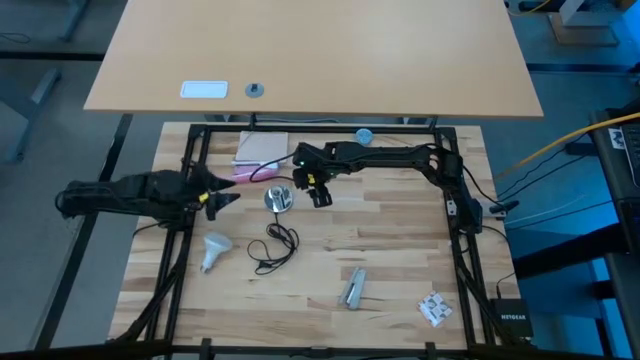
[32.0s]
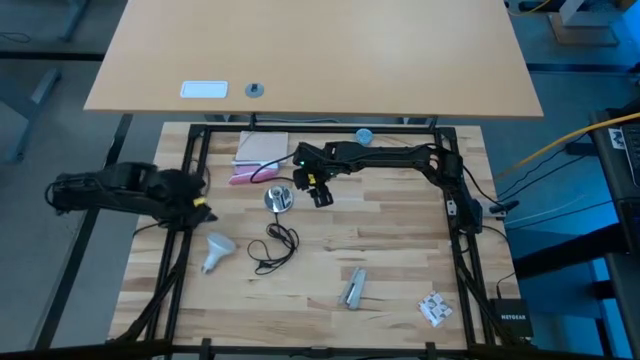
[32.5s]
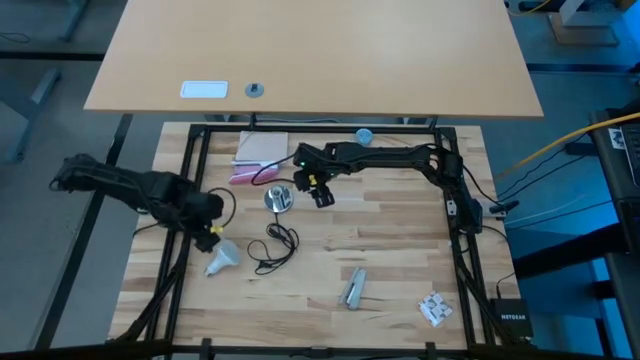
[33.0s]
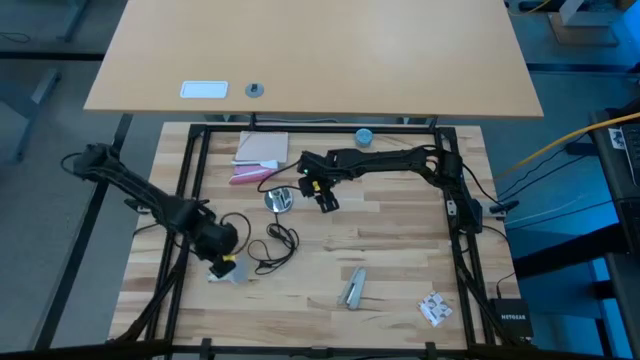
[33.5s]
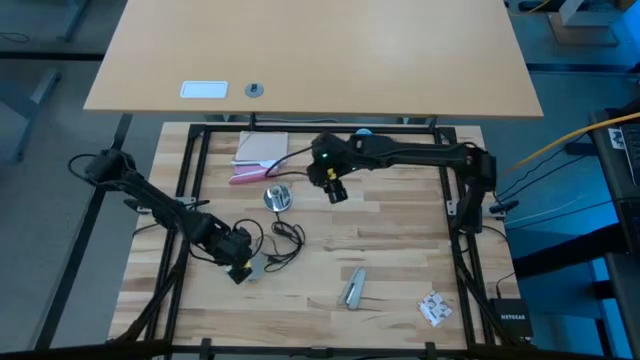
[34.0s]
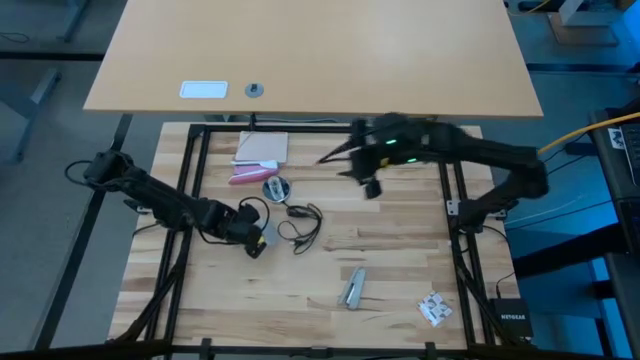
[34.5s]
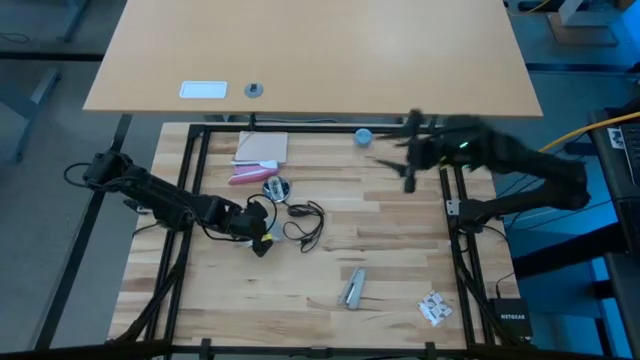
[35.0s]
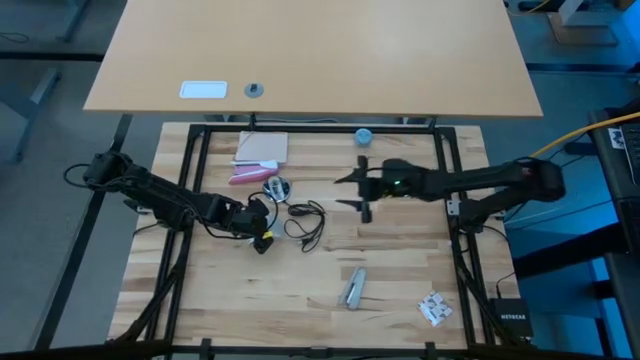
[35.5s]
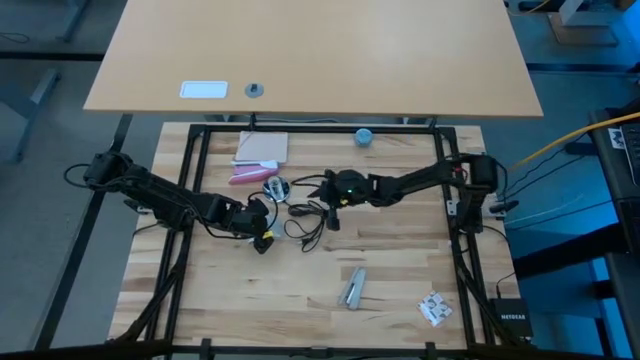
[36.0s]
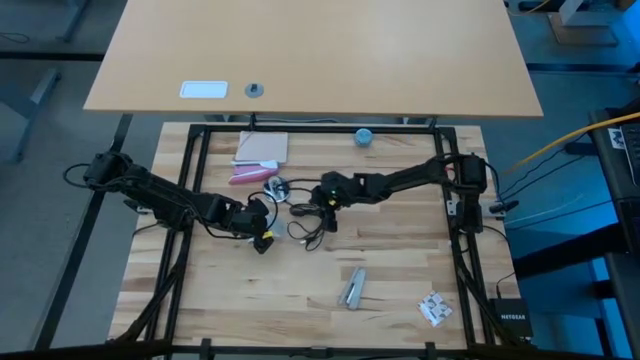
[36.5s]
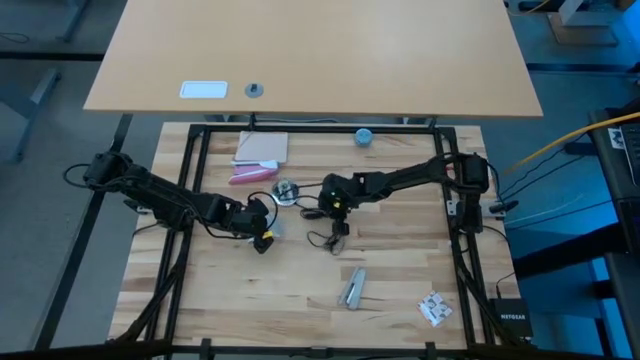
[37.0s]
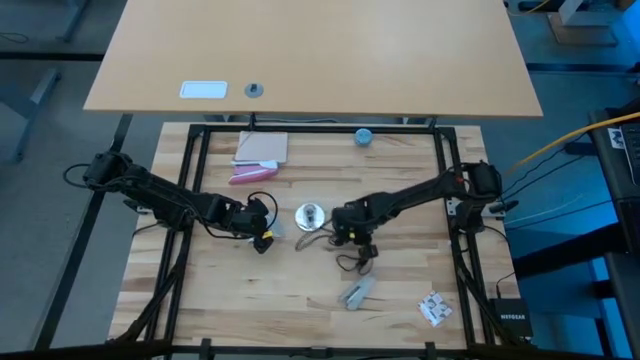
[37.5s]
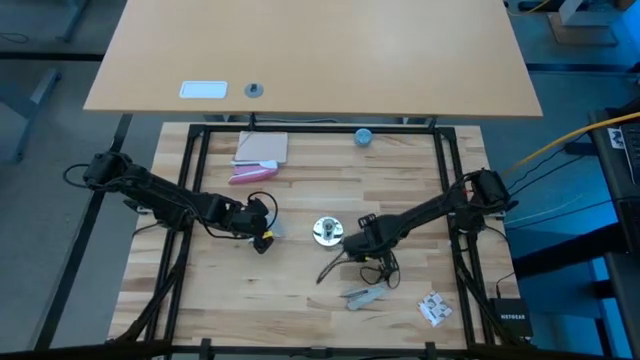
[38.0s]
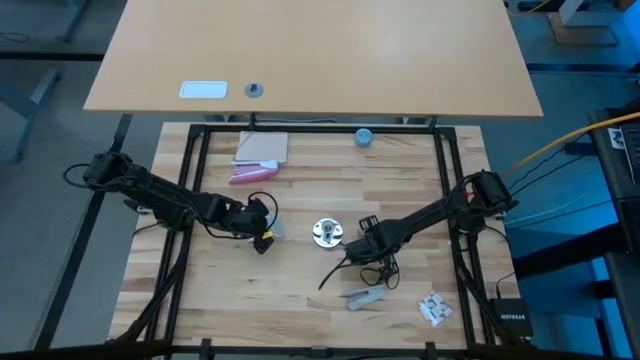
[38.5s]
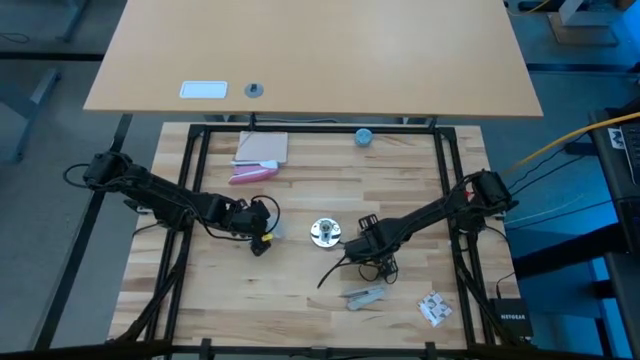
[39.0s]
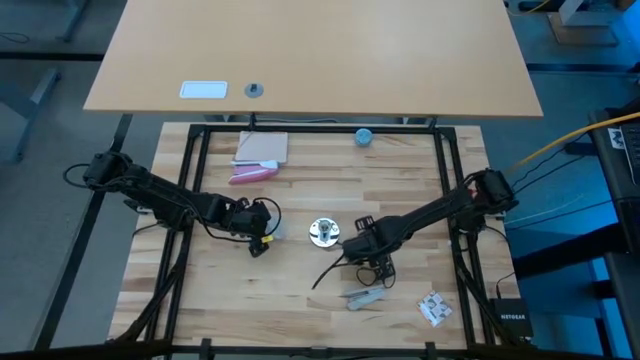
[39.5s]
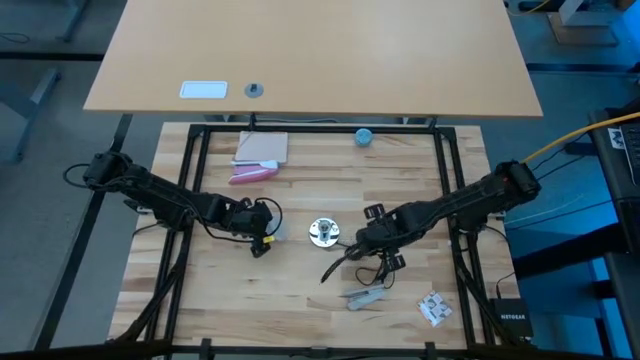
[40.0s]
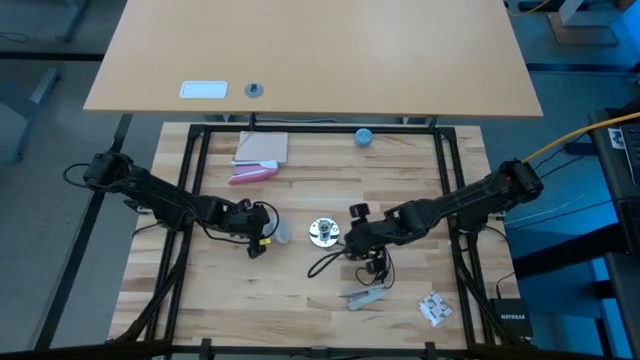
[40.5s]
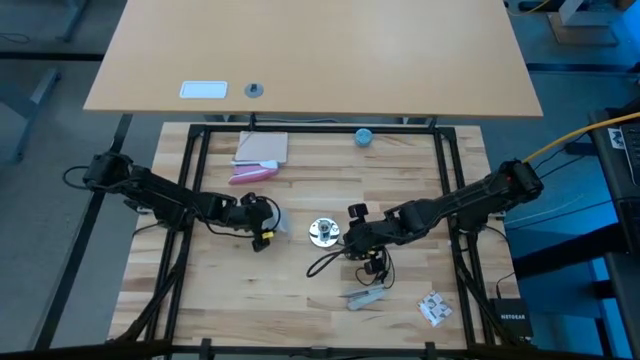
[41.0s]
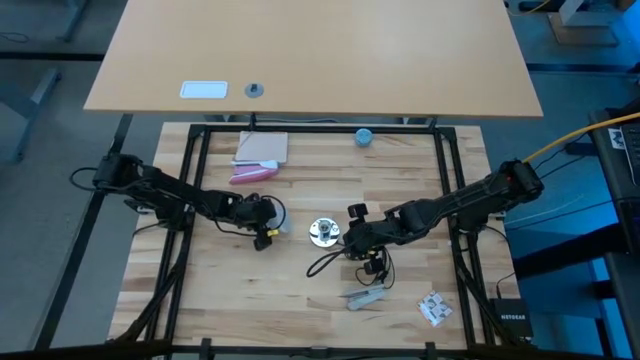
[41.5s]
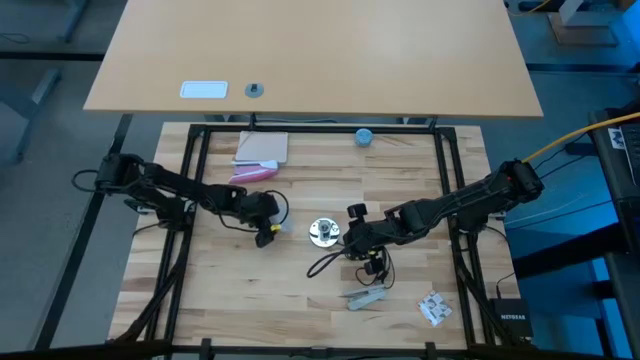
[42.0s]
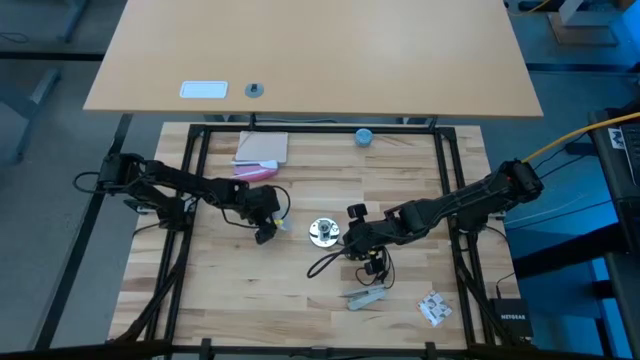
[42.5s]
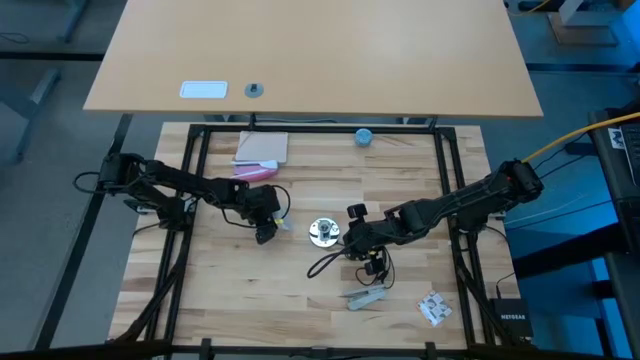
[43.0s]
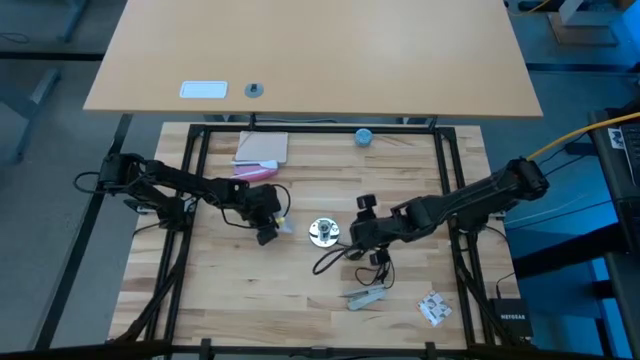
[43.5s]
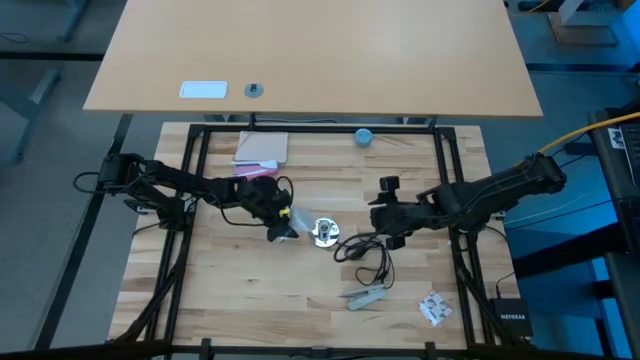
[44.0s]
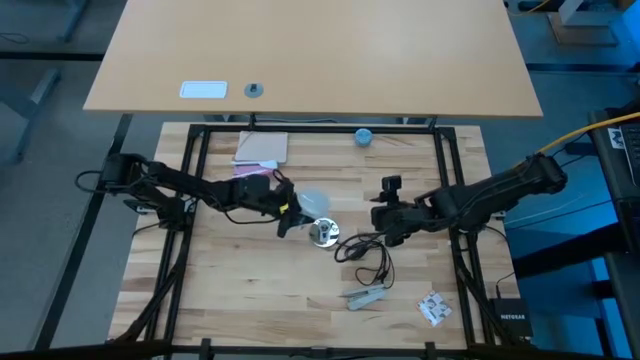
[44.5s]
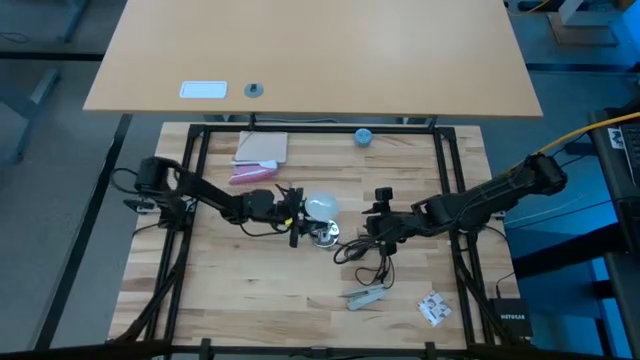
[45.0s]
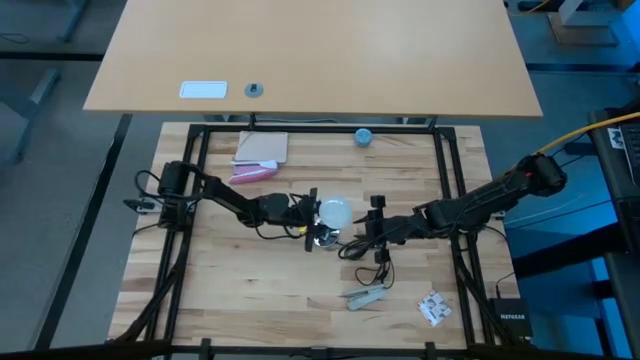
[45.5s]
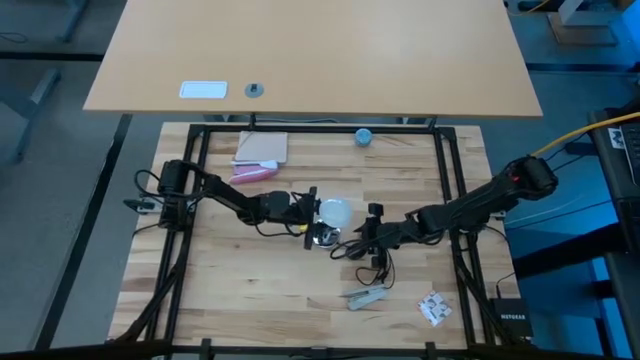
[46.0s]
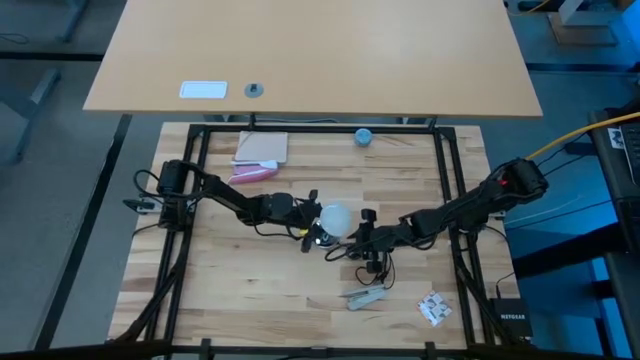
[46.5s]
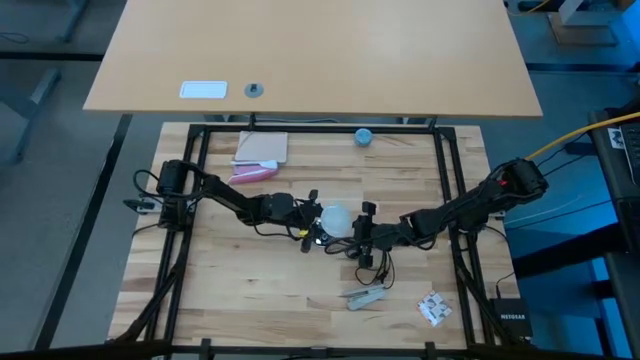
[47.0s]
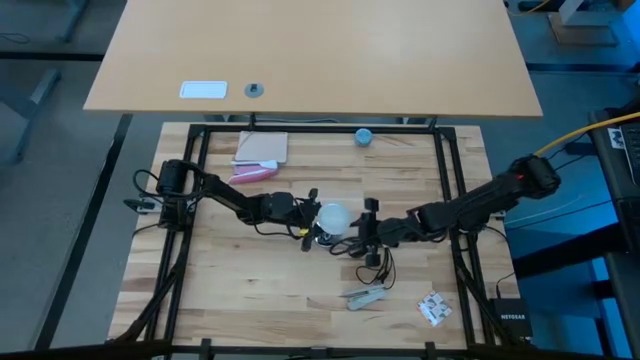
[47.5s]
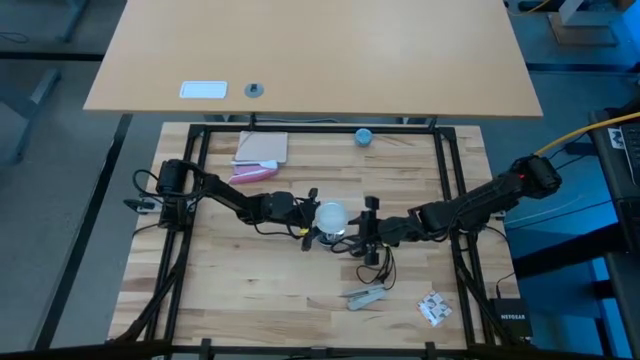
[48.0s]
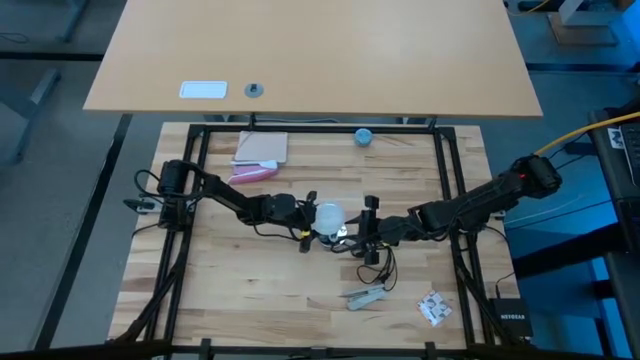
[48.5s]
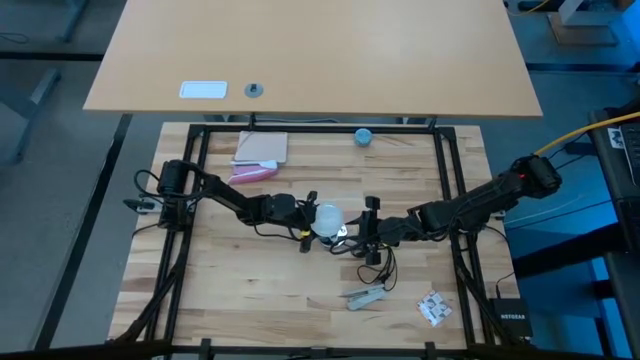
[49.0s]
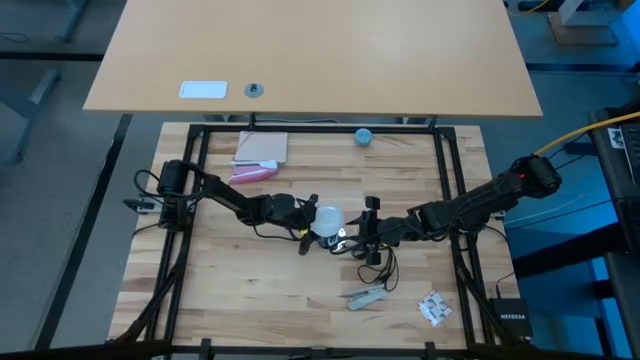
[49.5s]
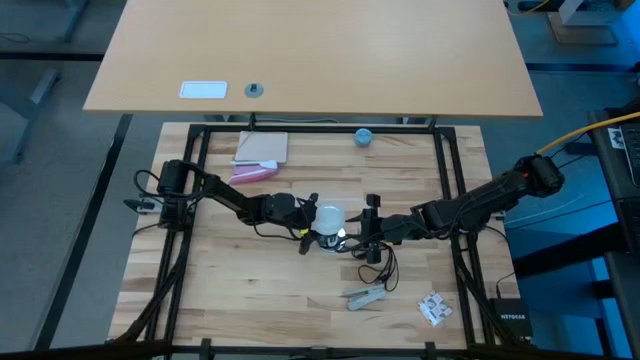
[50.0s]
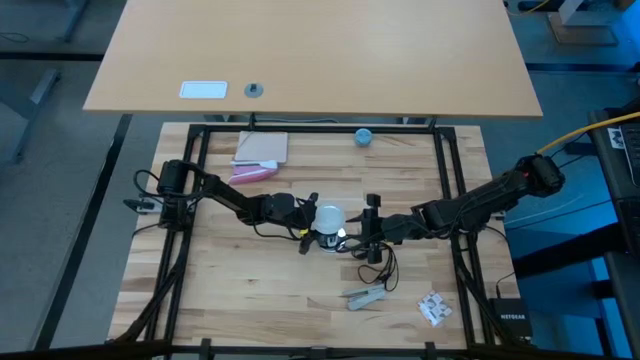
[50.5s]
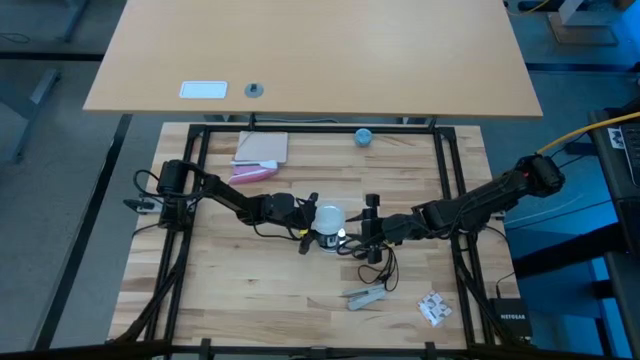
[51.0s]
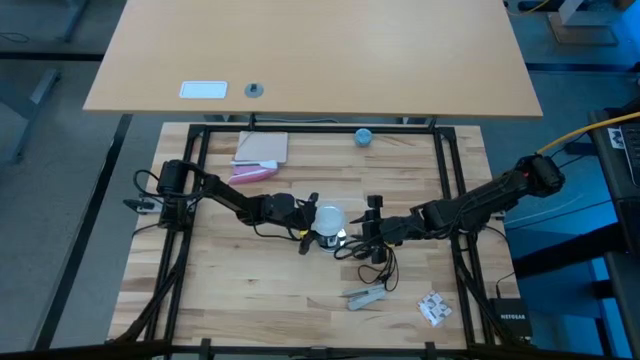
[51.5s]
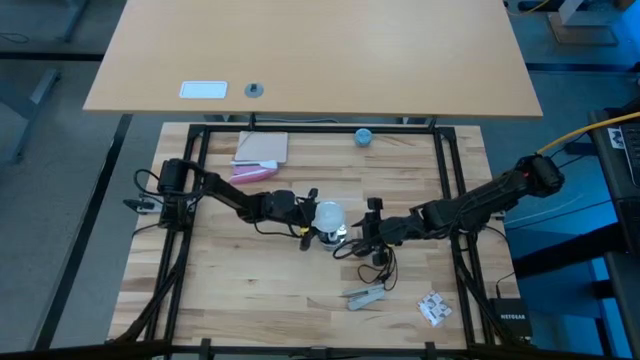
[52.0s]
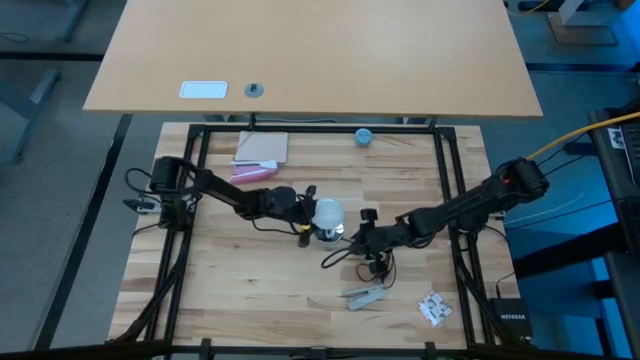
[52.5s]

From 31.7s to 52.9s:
Task: Screw lightbulb
Insert the lightbulb into the lamp
